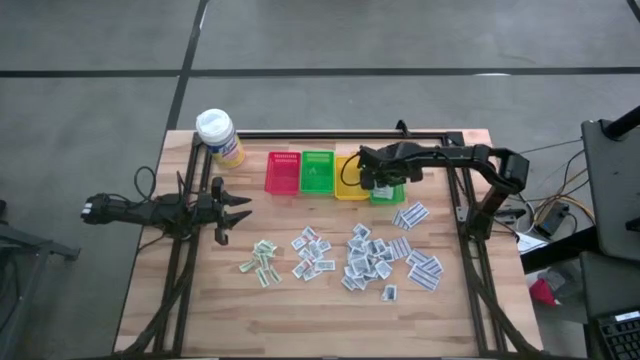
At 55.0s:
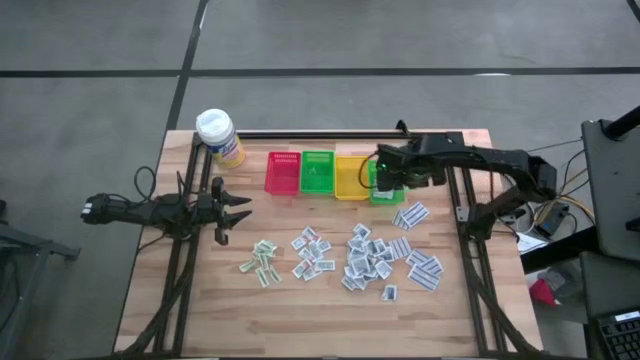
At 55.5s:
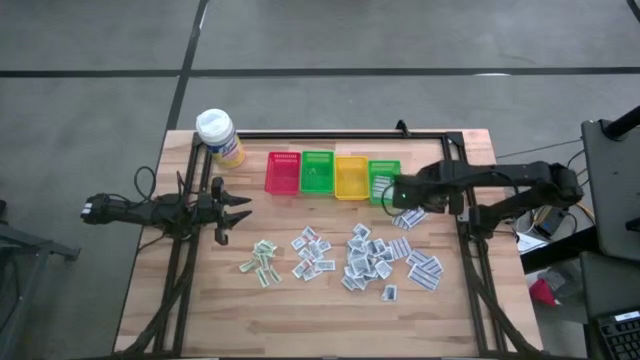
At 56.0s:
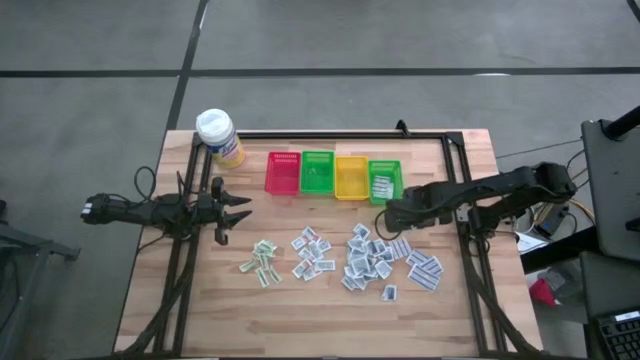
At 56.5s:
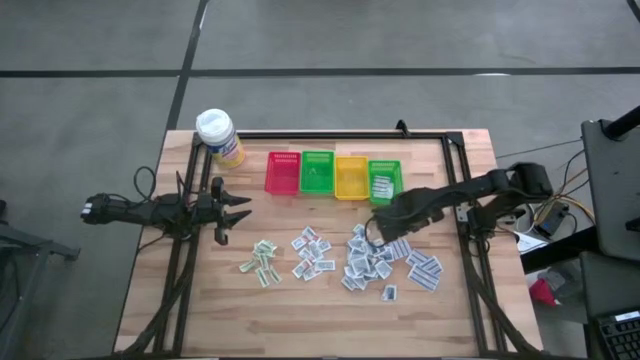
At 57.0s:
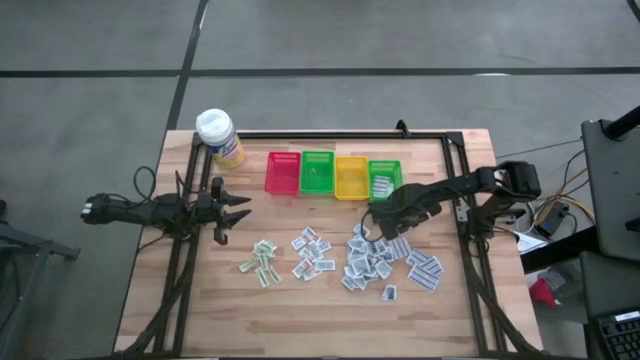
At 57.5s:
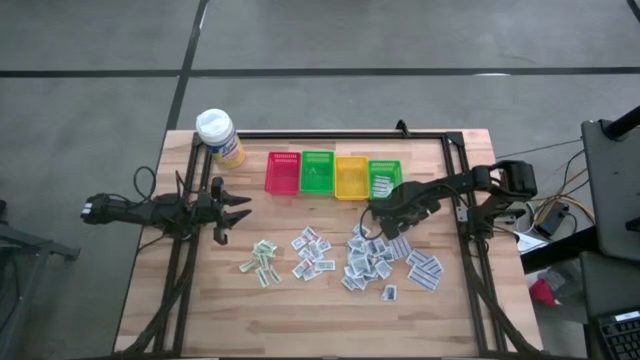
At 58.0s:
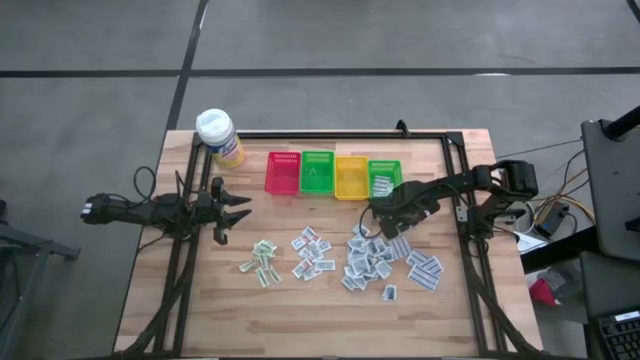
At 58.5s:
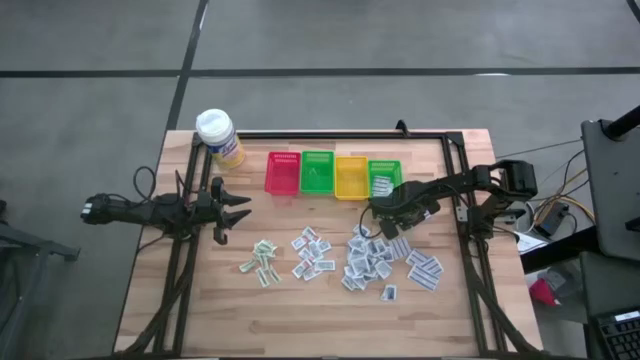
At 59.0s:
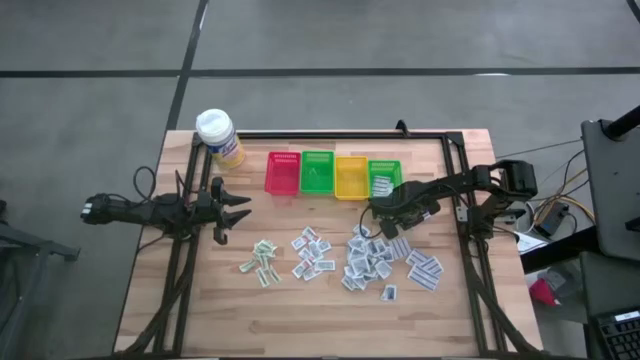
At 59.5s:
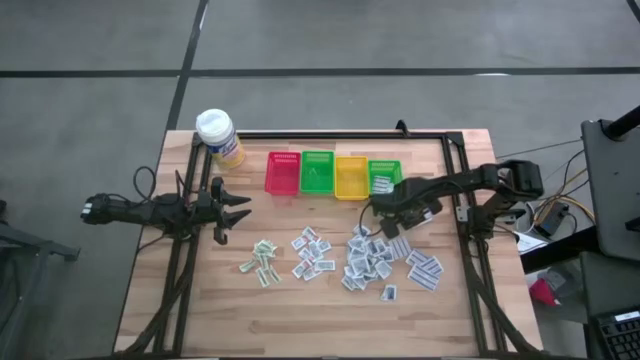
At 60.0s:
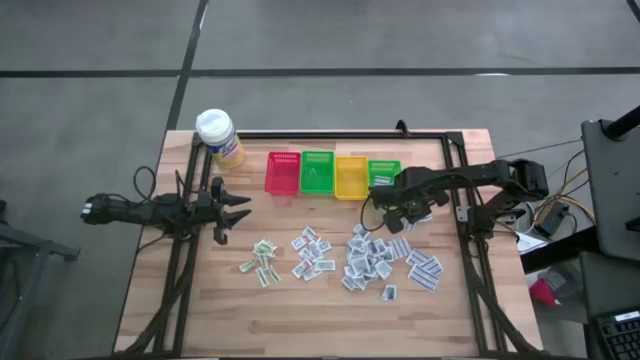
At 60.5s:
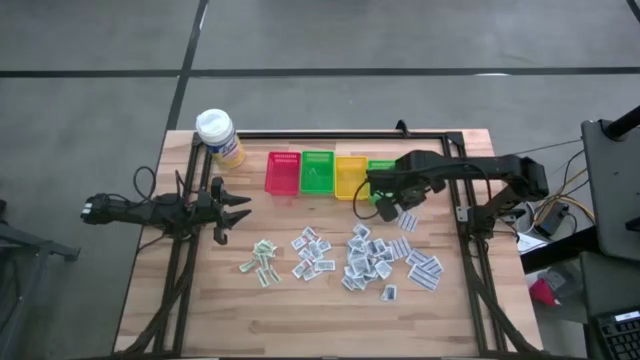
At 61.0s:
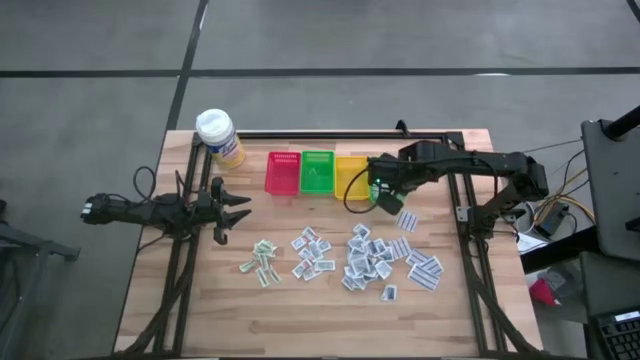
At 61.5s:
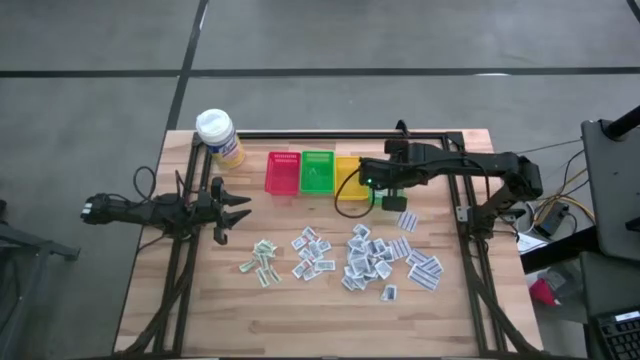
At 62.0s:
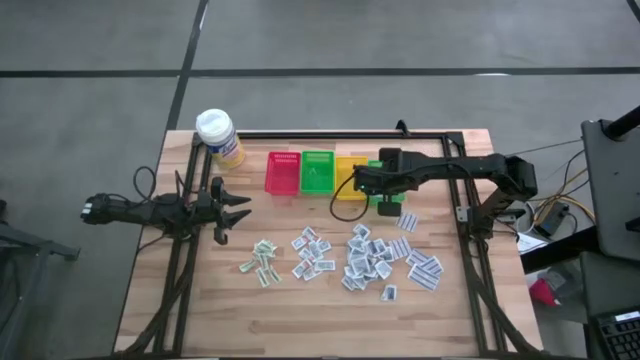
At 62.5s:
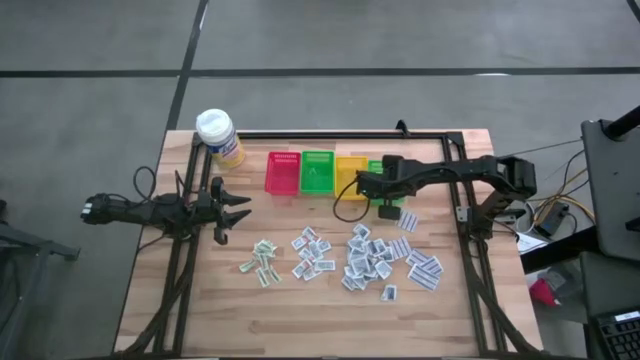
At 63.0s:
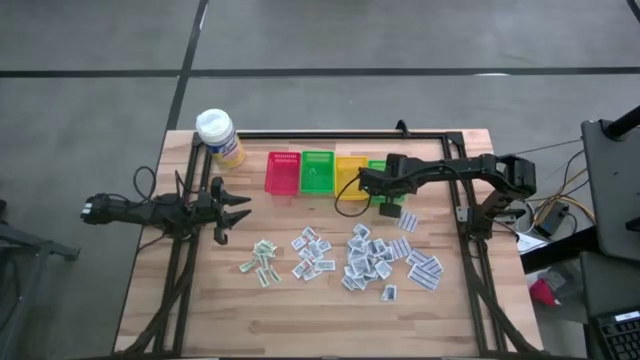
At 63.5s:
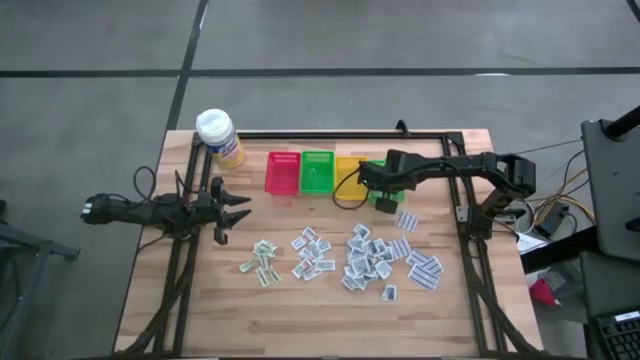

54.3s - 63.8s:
Task: Pick & Place First Aid Supplies
Put the blue bandage into the right green bin

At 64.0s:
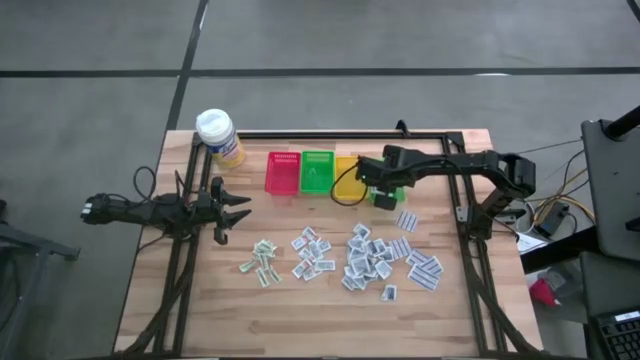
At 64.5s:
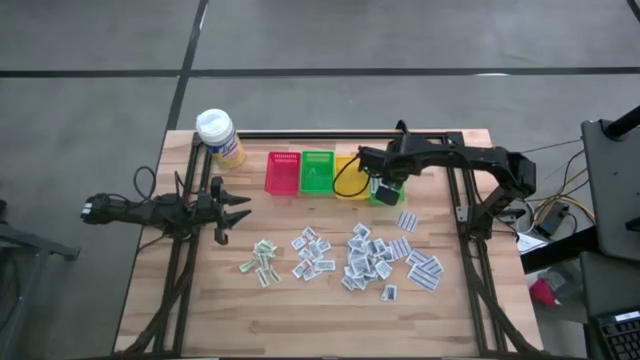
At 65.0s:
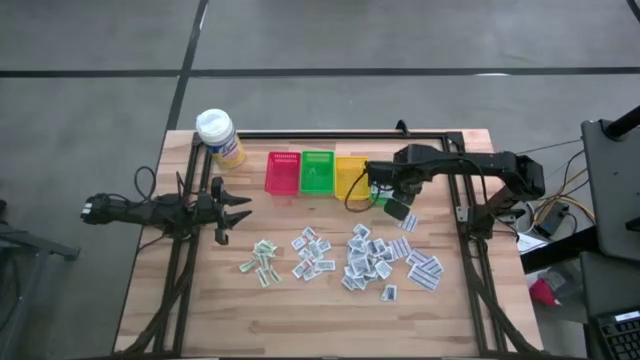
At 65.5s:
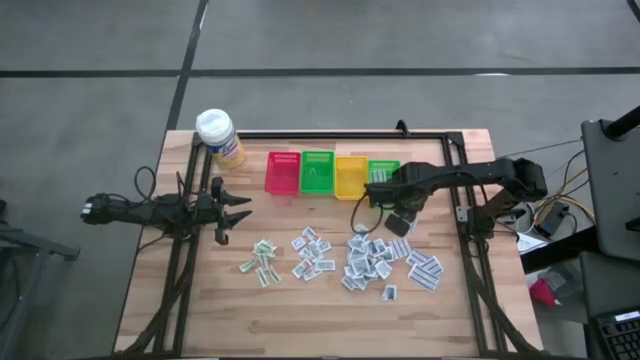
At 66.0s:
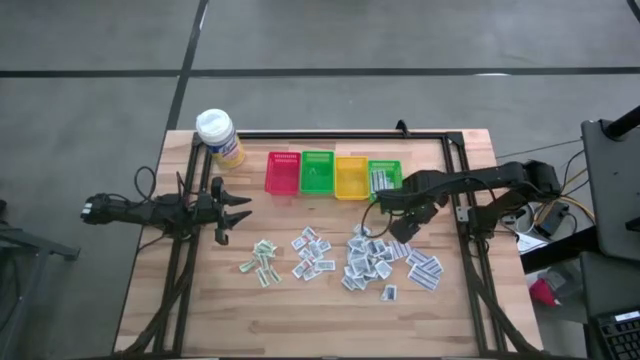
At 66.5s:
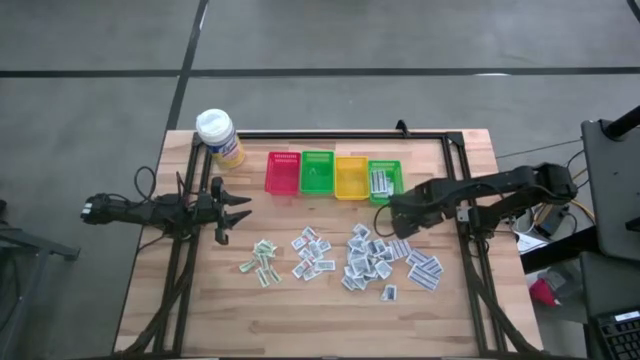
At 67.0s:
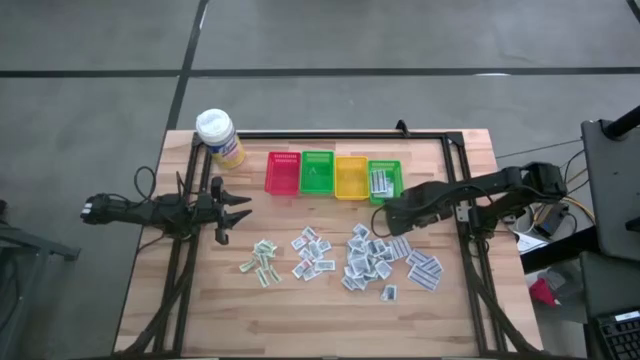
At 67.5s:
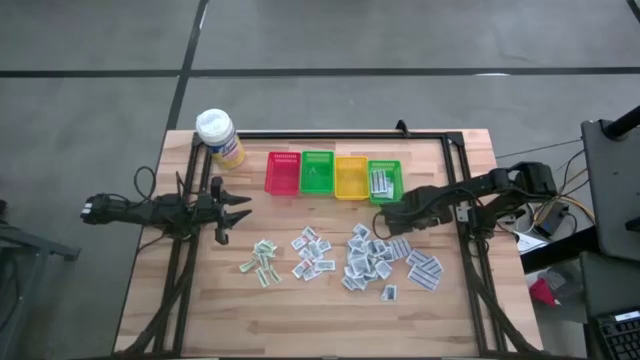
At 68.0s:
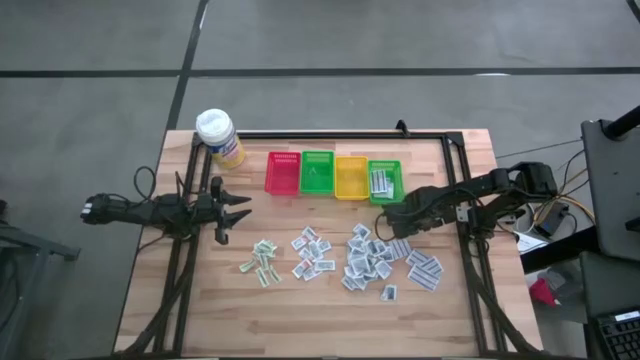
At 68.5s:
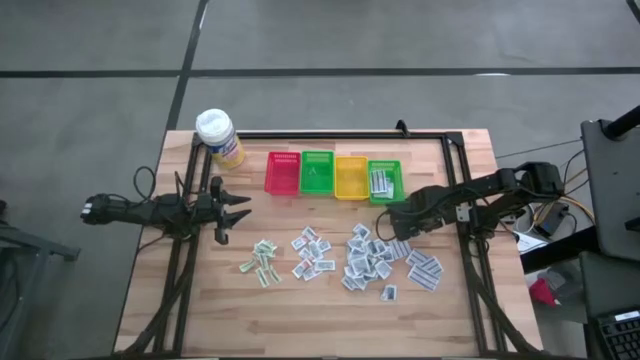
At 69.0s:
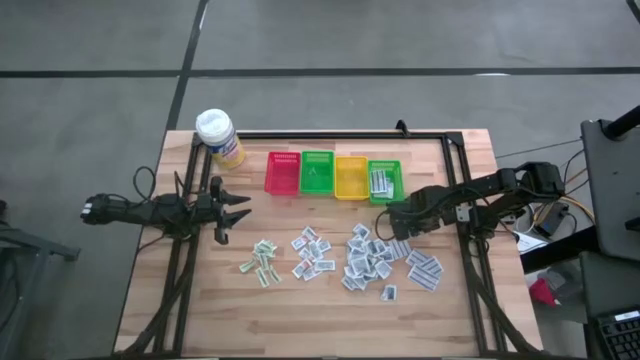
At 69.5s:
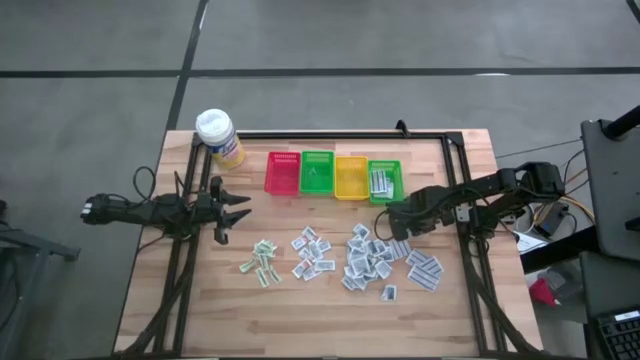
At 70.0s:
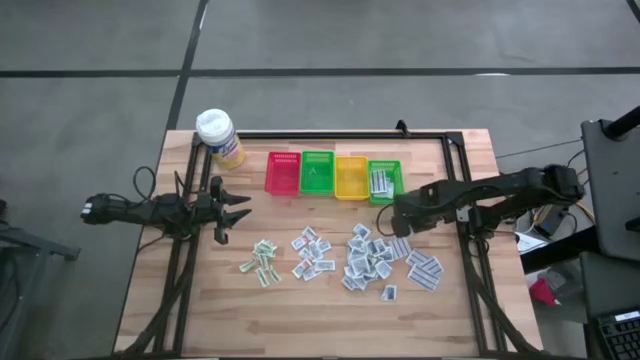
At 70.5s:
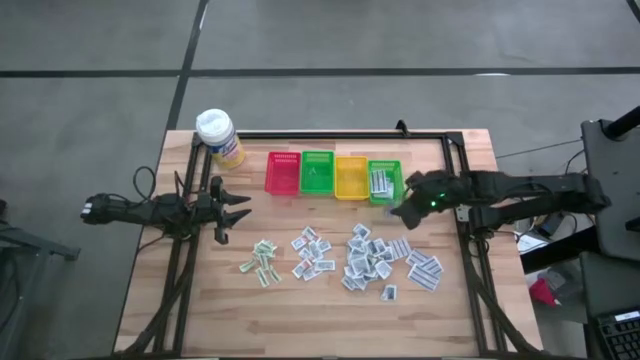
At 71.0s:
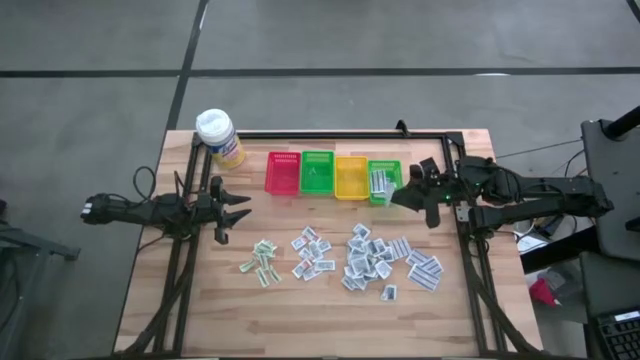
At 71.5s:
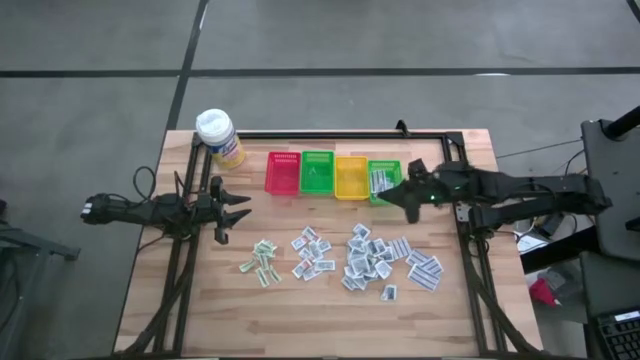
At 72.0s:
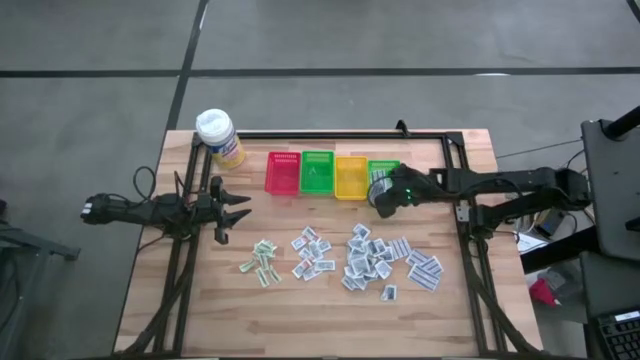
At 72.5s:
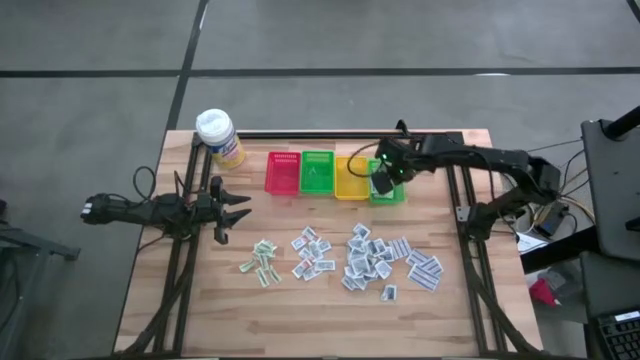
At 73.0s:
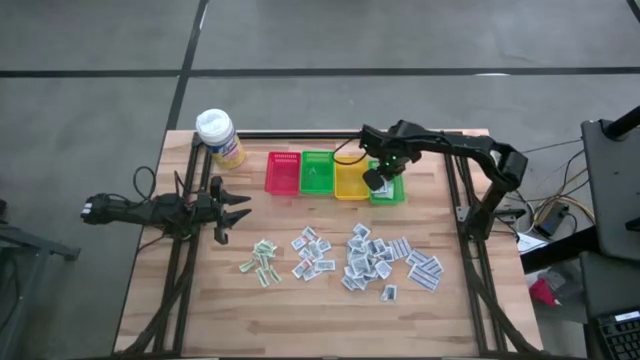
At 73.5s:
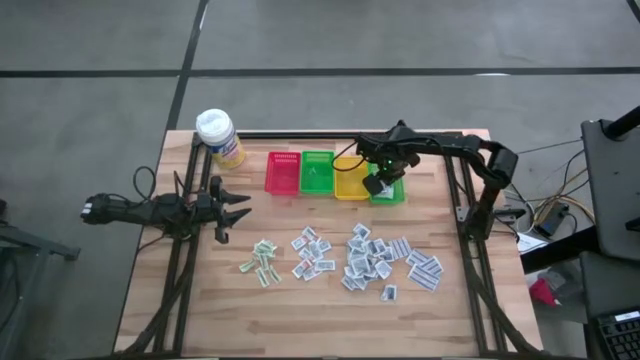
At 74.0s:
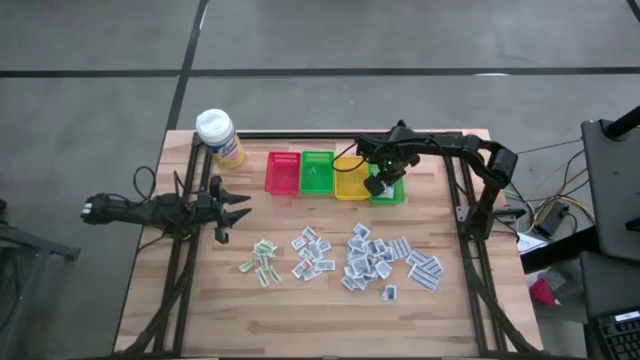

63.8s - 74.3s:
Put the blue bandage into the right green bin
